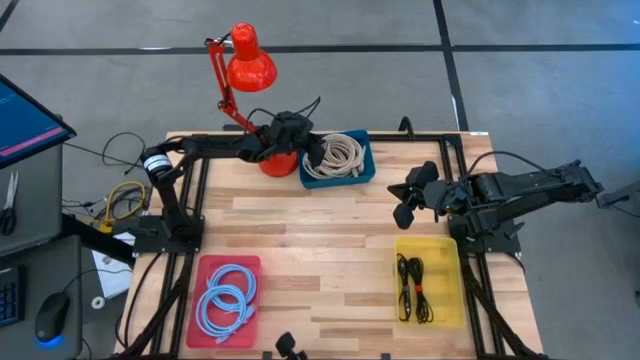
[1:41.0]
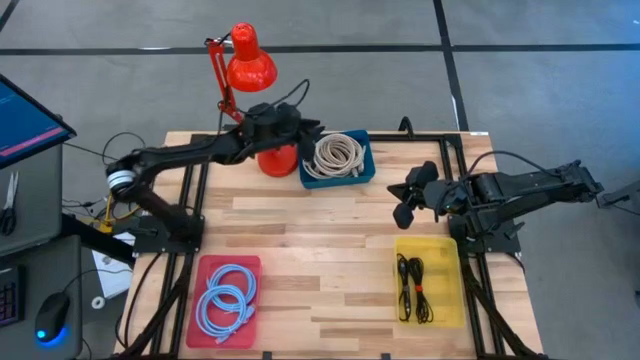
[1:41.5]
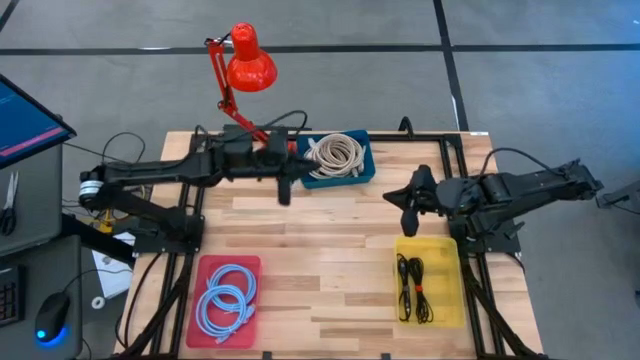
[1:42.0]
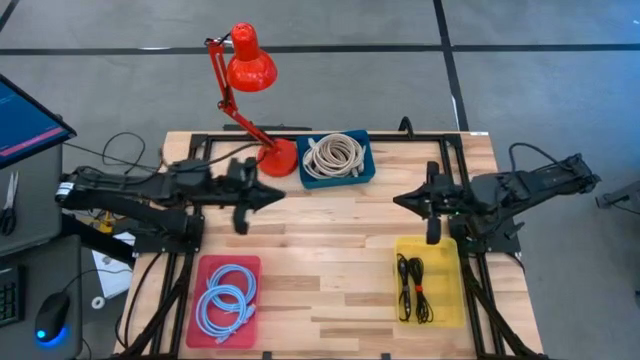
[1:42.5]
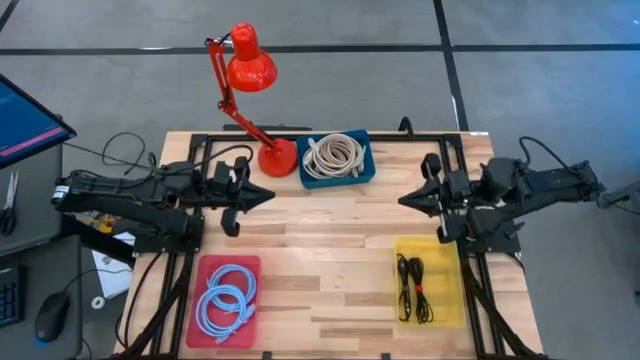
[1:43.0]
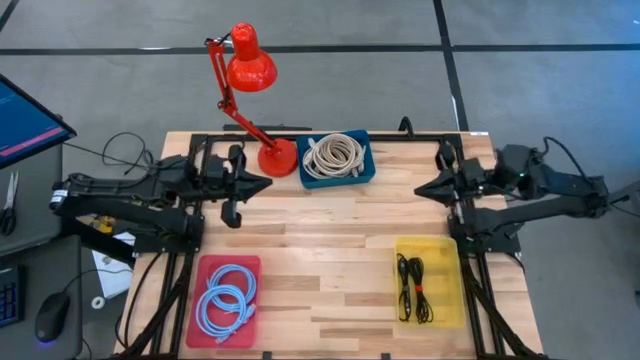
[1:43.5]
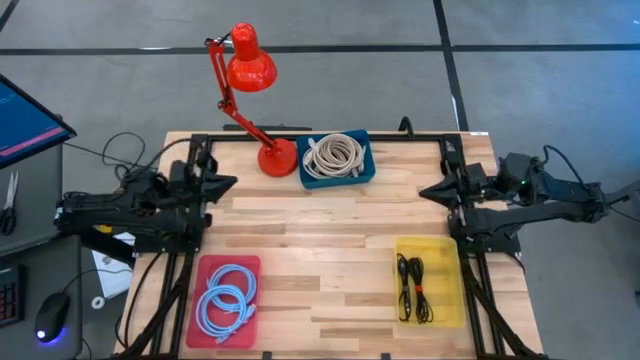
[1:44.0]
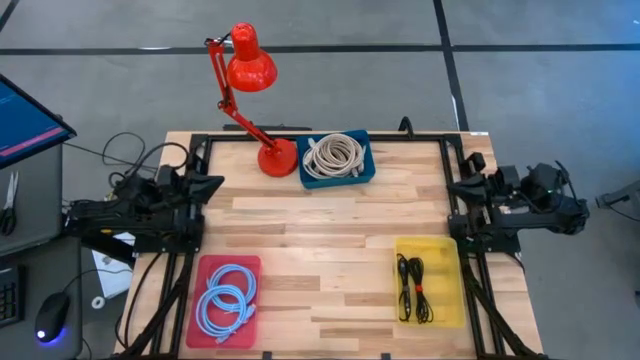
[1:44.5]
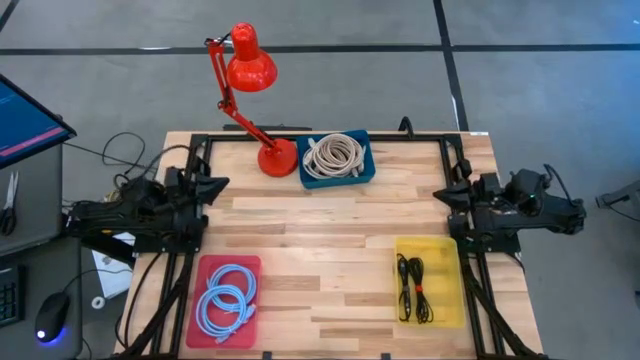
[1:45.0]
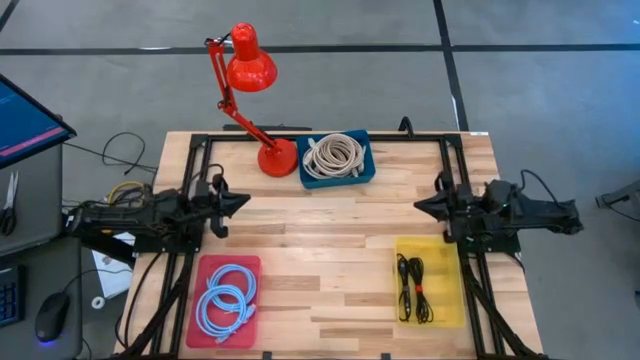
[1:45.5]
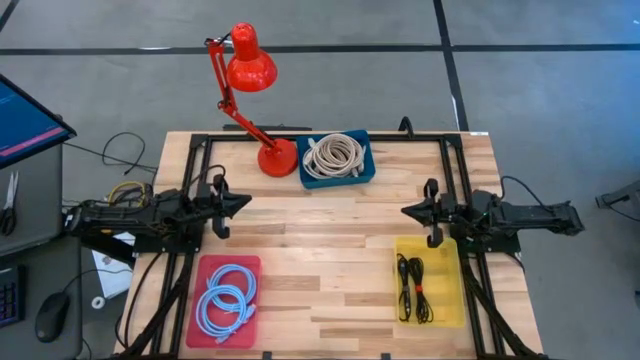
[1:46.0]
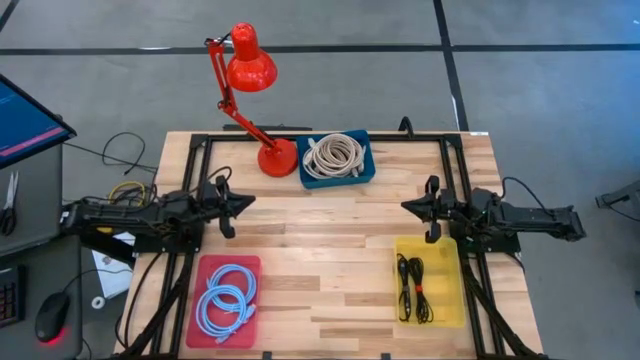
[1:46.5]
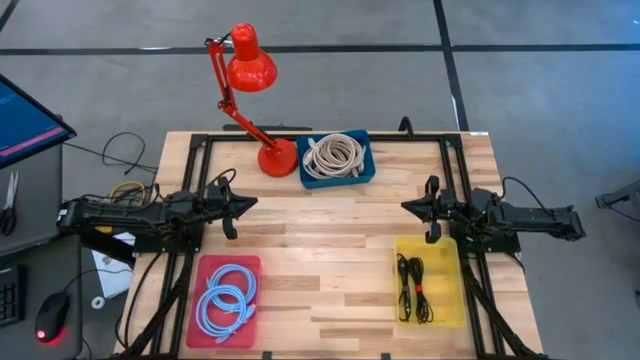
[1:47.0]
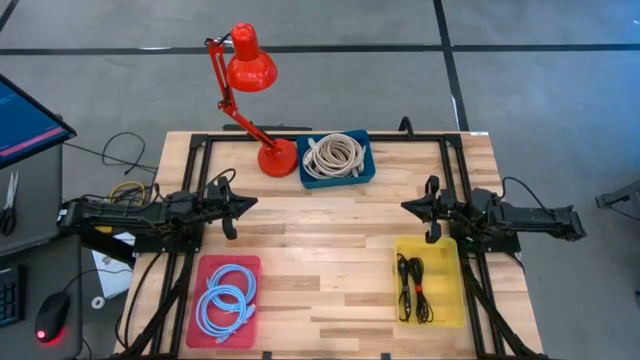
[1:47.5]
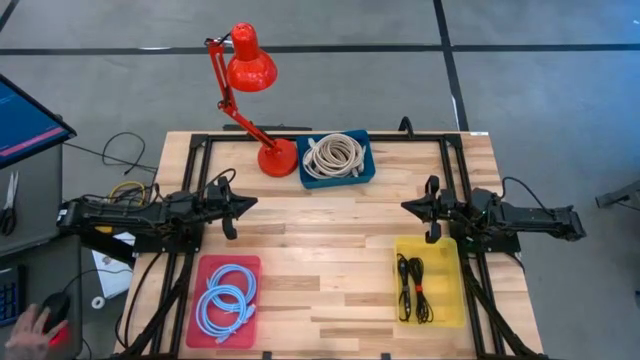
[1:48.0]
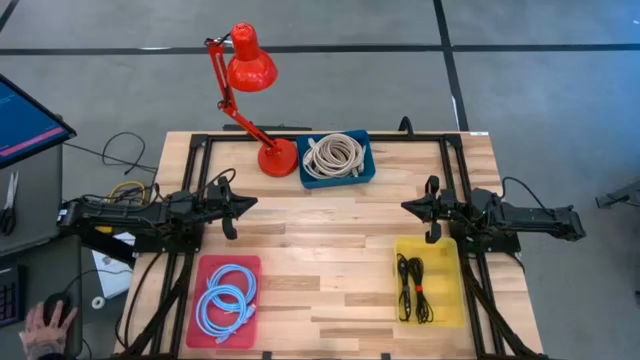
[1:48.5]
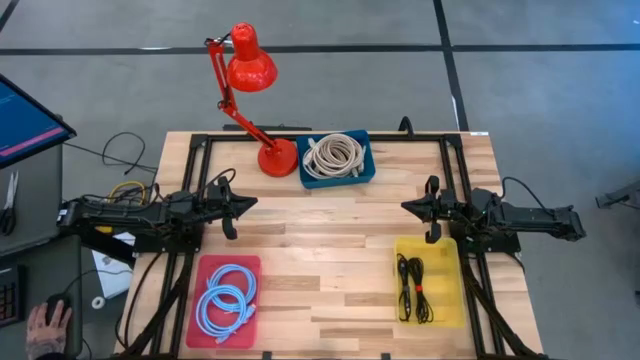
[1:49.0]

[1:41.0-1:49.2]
Task: Sort HDMI cables
Return to Home Position

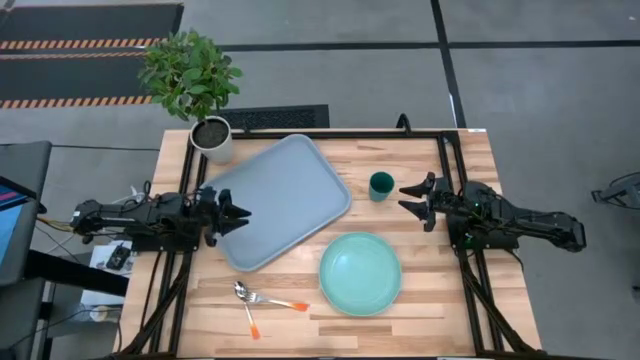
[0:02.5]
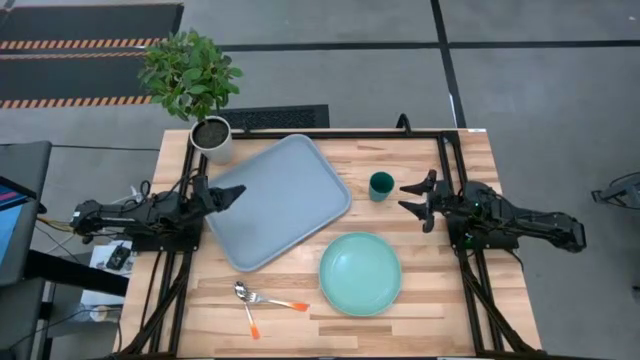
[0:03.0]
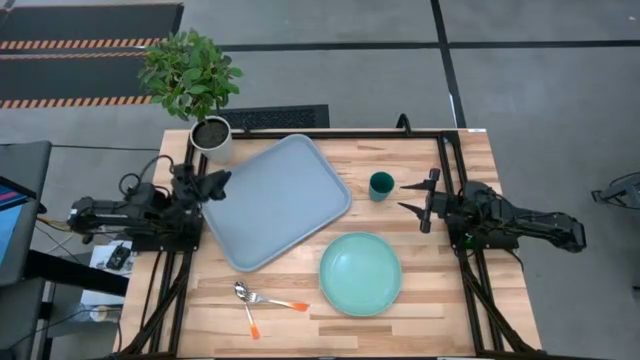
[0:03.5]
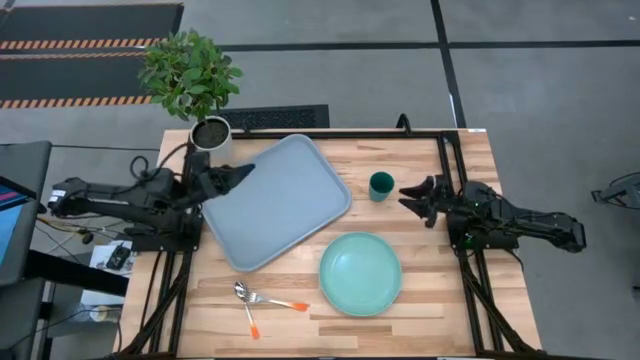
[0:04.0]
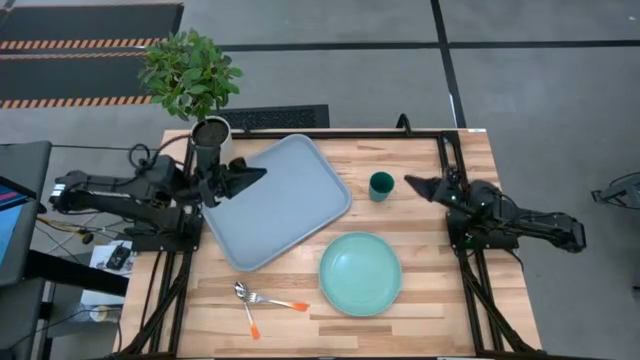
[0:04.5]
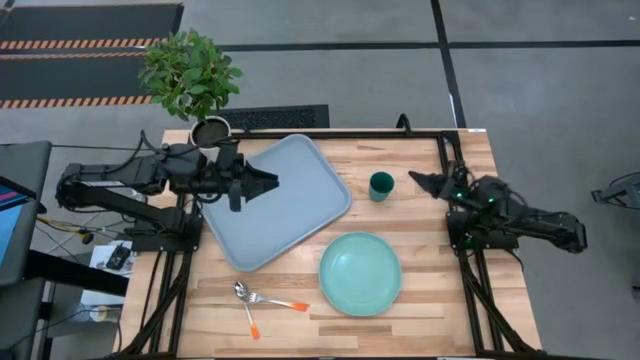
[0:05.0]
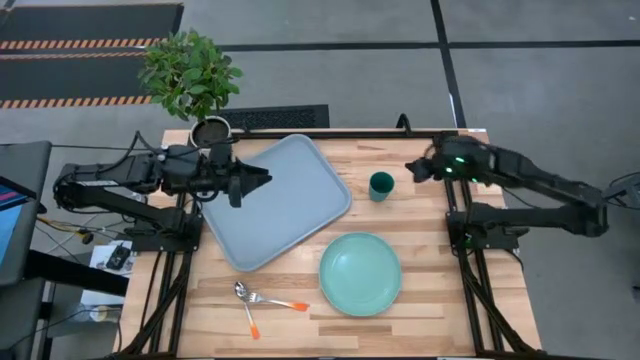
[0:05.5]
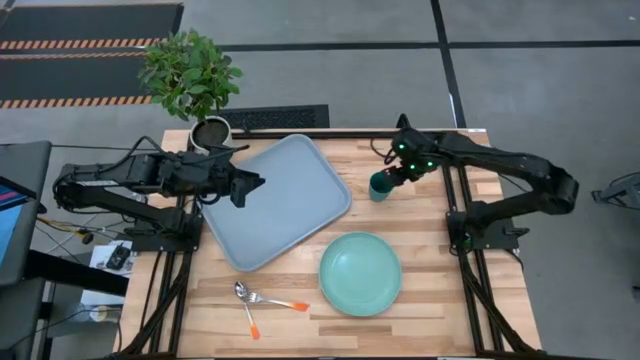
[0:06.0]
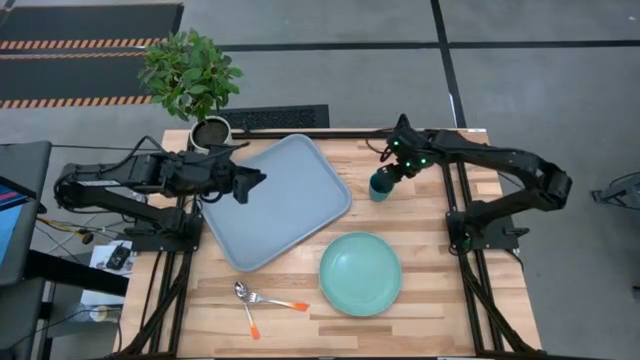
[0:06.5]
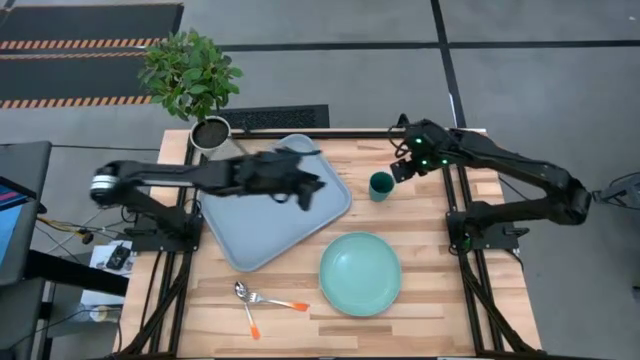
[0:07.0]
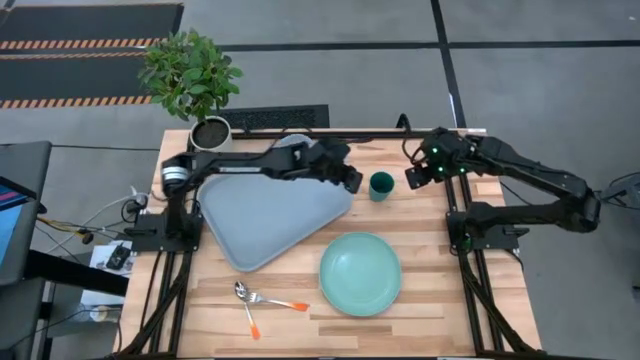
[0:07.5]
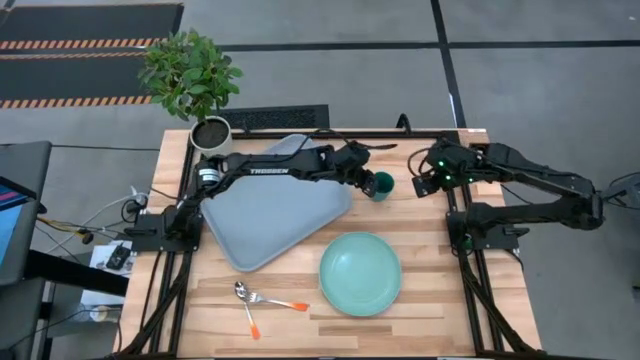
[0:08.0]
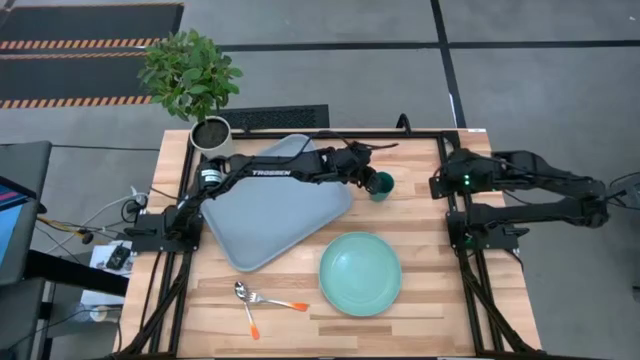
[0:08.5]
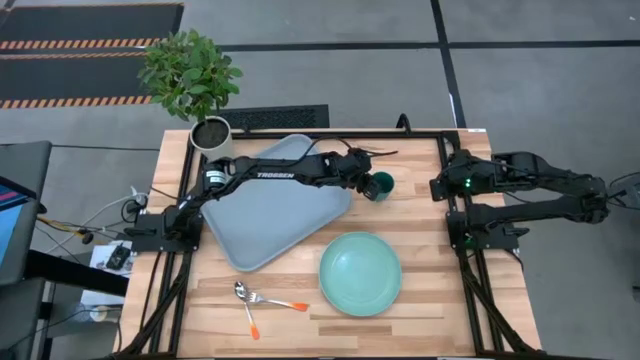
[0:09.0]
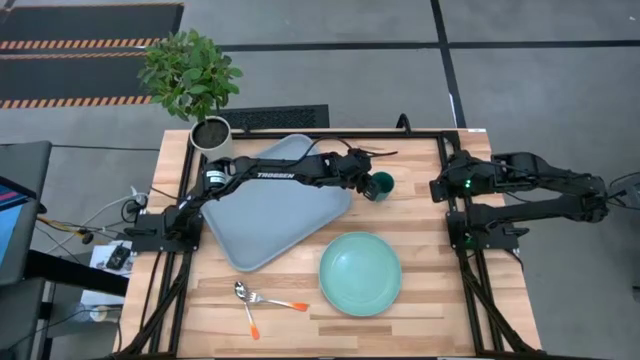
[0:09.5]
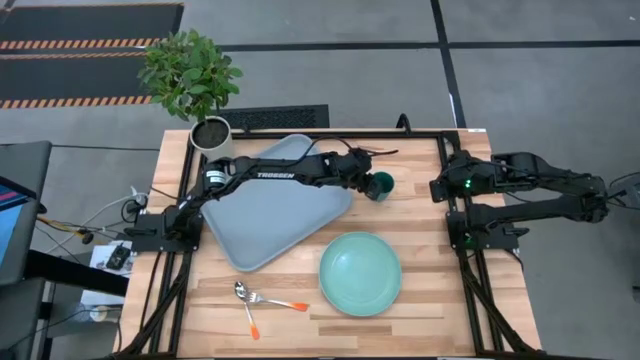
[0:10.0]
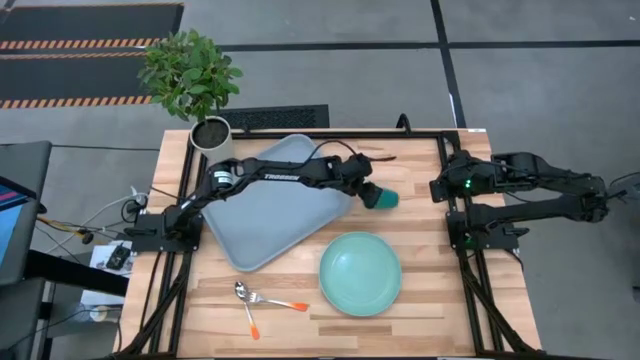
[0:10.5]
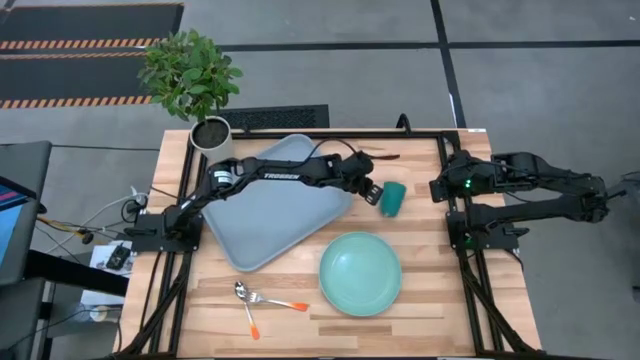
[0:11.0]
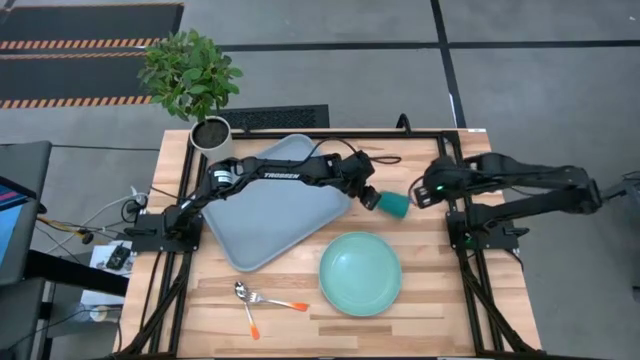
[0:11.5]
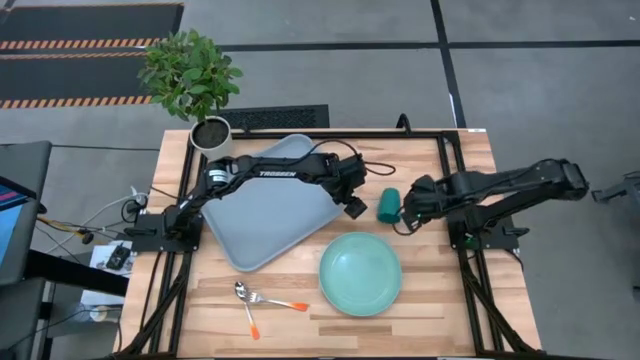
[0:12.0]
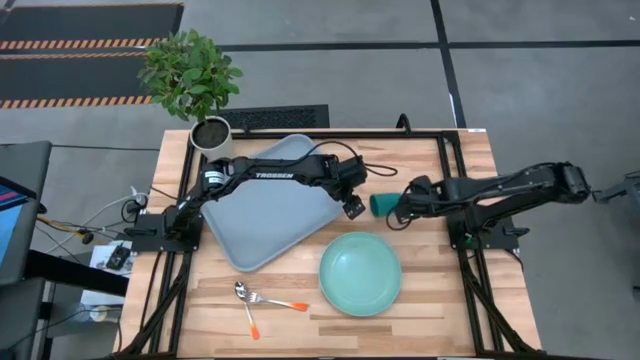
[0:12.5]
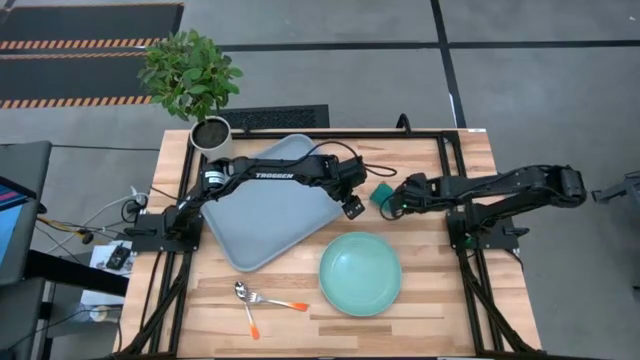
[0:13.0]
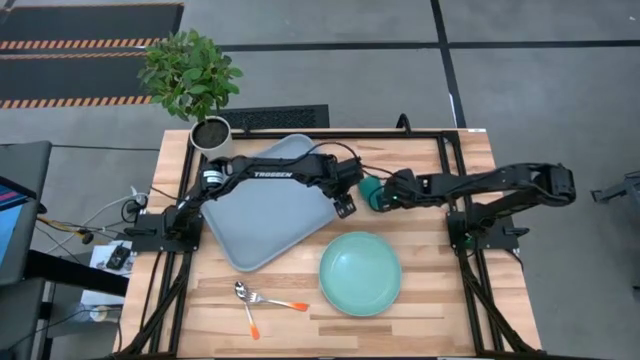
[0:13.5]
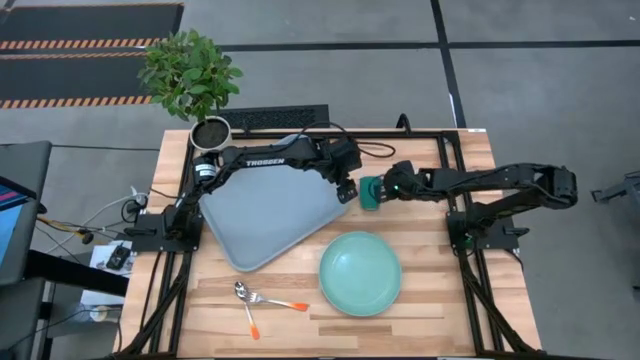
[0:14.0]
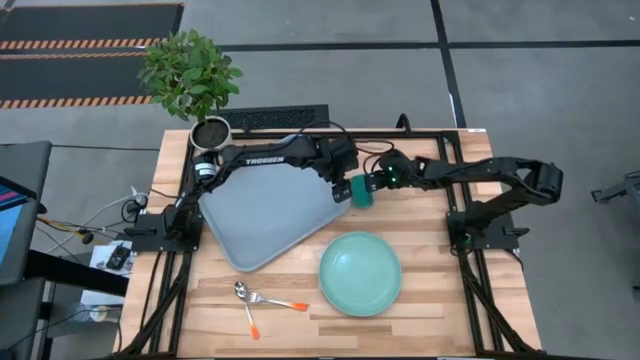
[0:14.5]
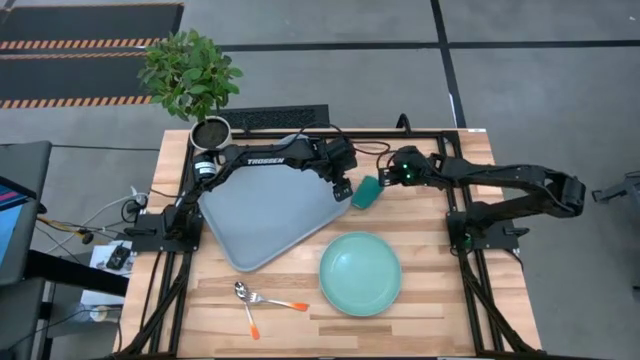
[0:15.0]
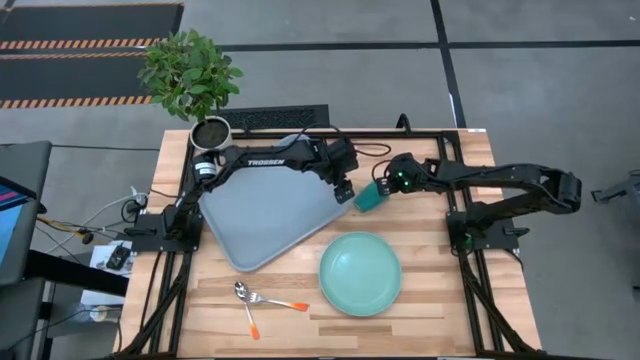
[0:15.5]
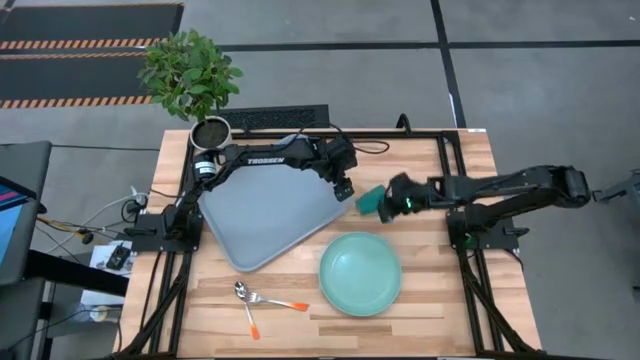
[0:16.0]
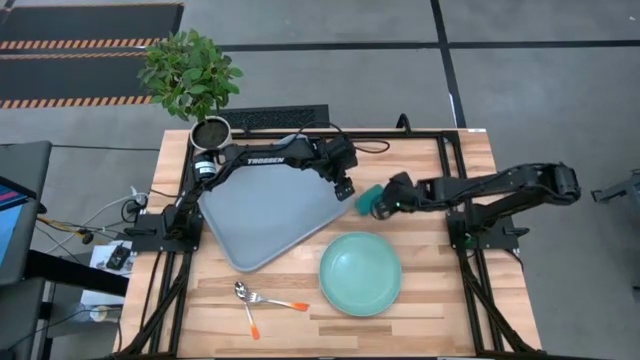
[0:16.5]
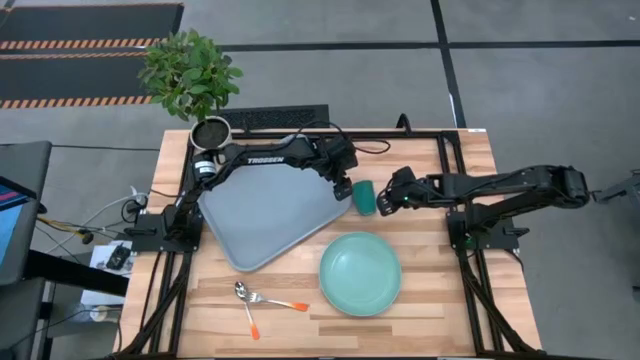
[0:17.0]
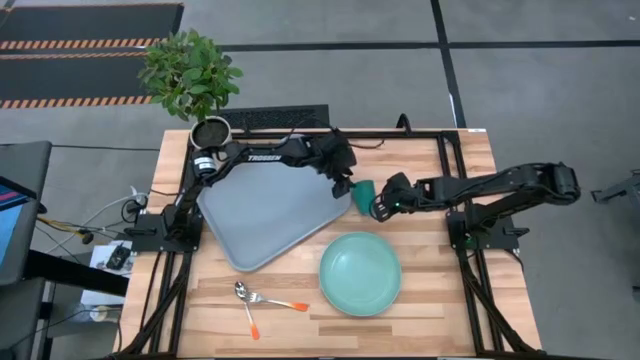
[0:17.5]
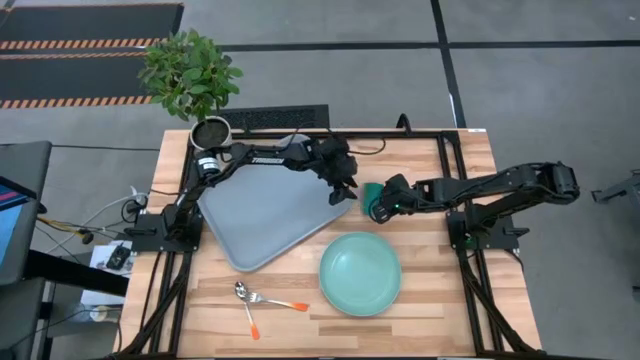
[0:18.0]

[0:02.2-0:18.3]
Task: Pick and place plate/cup/fork/spoon on tray
Put the green cup on the gray serving tray
